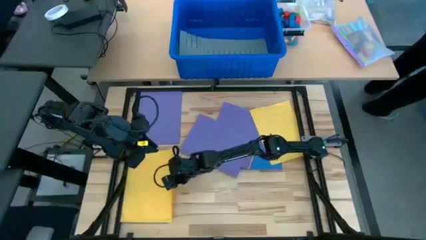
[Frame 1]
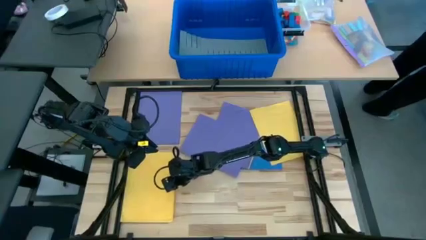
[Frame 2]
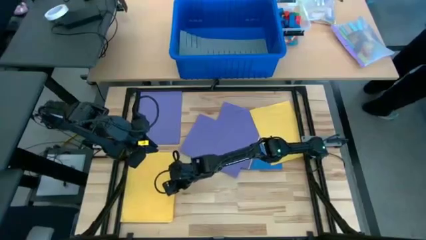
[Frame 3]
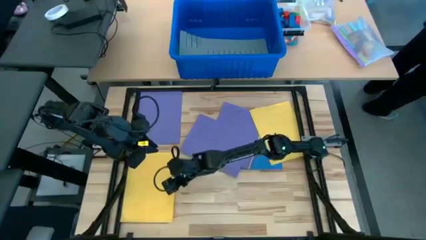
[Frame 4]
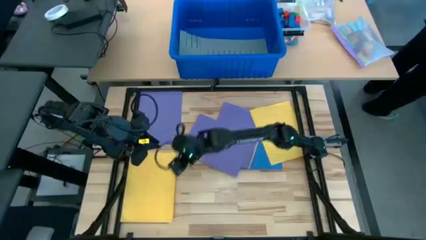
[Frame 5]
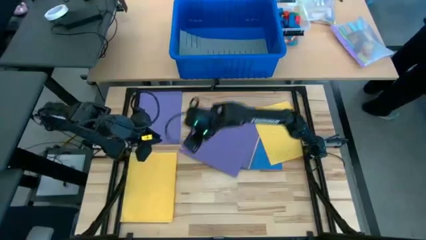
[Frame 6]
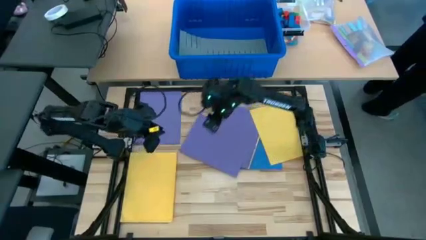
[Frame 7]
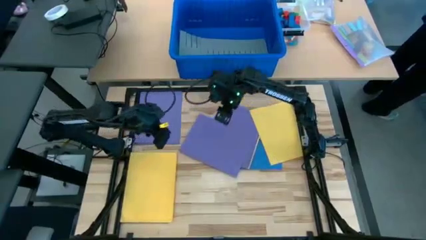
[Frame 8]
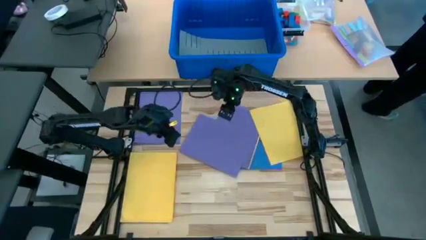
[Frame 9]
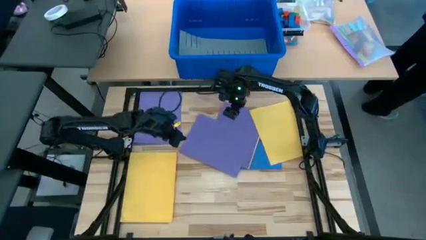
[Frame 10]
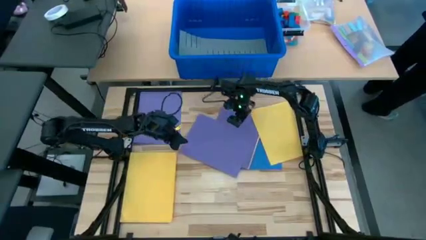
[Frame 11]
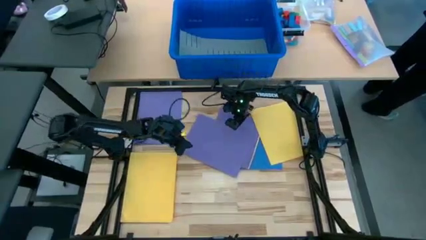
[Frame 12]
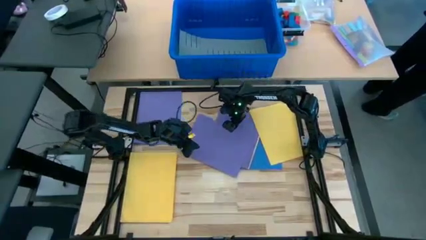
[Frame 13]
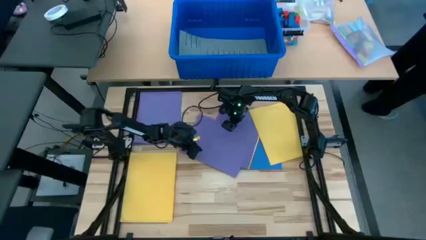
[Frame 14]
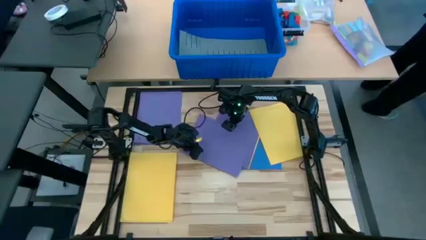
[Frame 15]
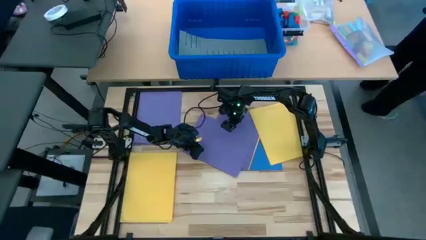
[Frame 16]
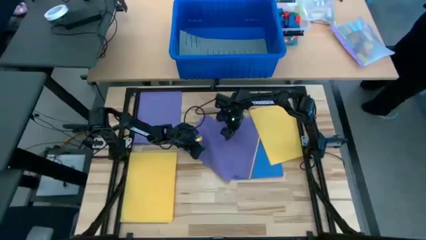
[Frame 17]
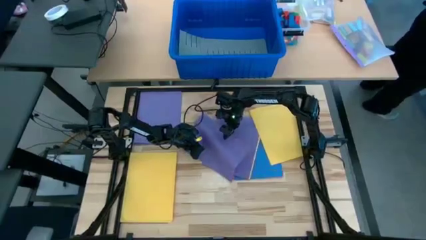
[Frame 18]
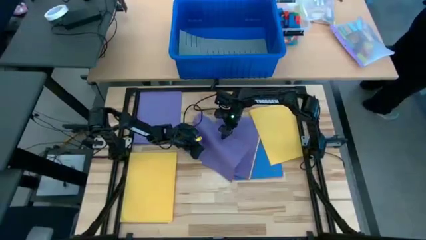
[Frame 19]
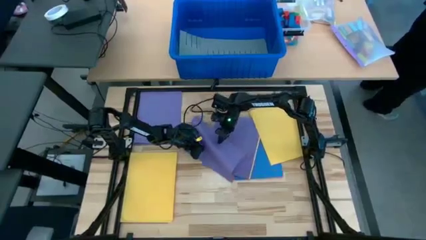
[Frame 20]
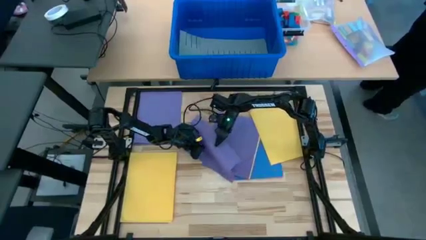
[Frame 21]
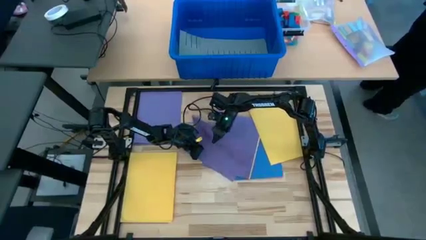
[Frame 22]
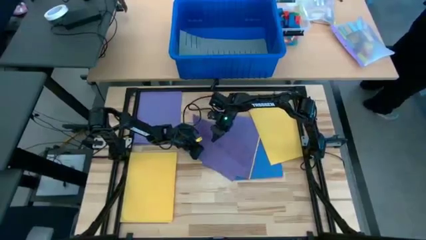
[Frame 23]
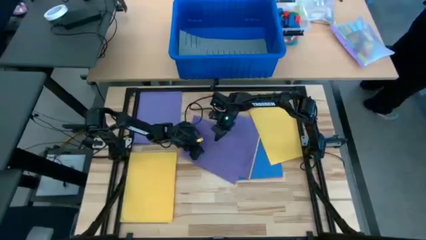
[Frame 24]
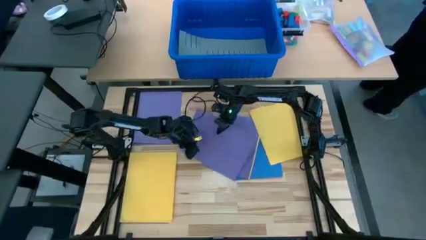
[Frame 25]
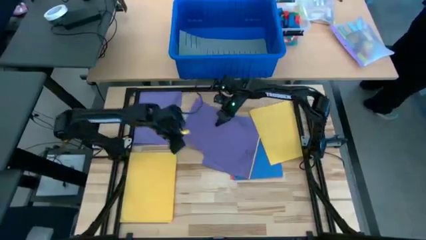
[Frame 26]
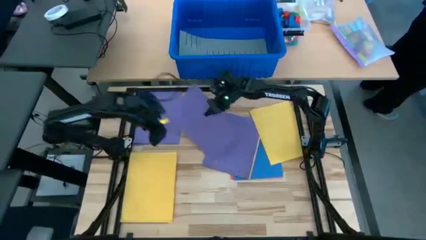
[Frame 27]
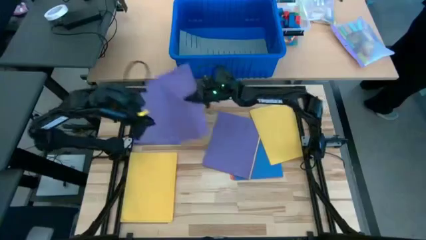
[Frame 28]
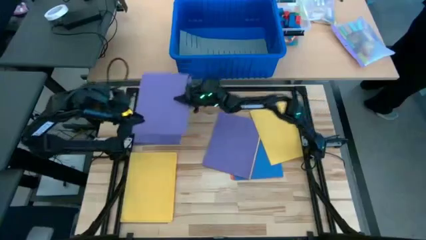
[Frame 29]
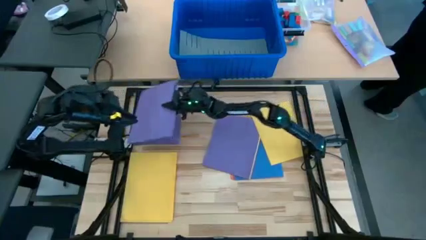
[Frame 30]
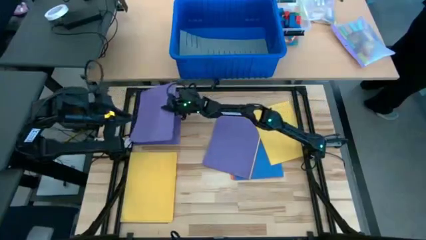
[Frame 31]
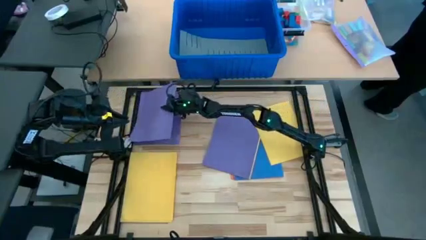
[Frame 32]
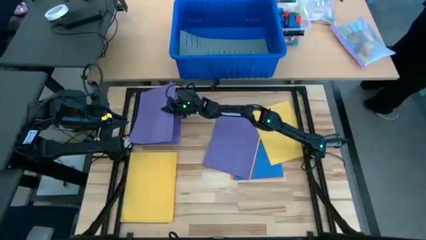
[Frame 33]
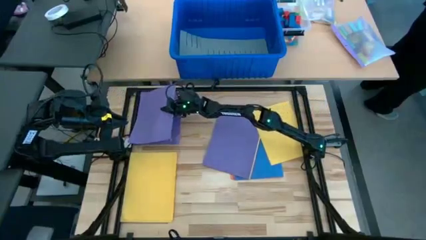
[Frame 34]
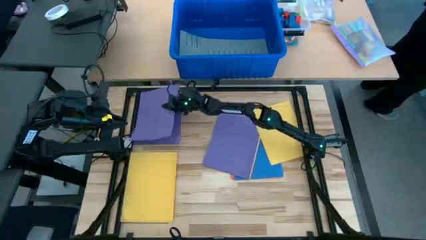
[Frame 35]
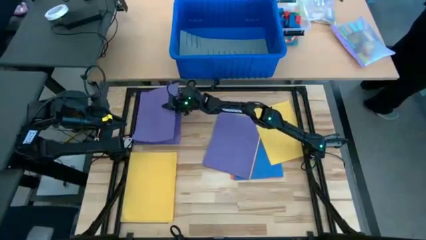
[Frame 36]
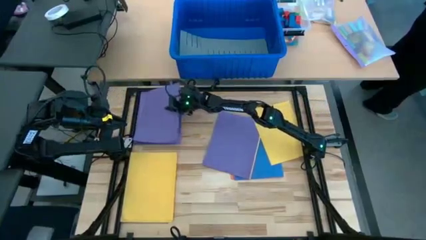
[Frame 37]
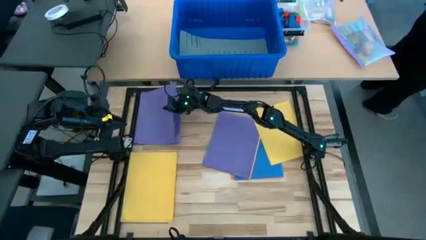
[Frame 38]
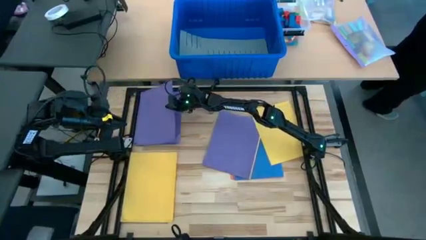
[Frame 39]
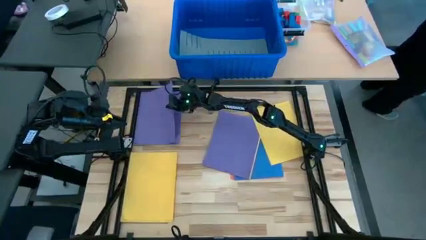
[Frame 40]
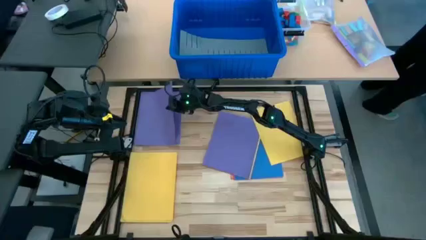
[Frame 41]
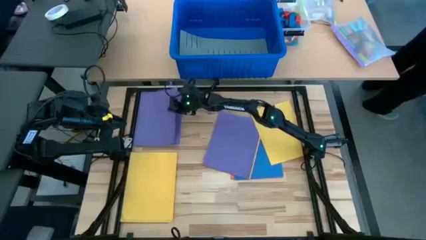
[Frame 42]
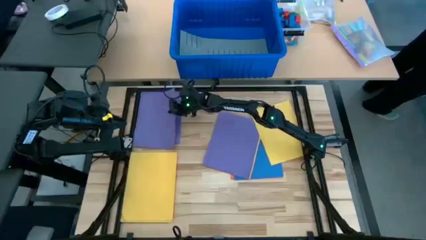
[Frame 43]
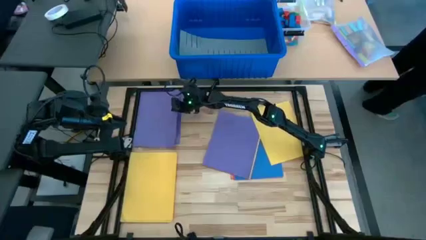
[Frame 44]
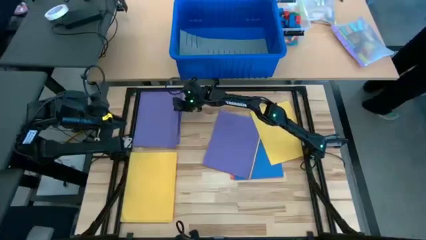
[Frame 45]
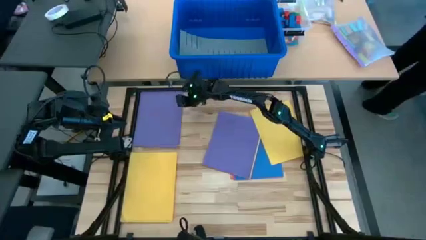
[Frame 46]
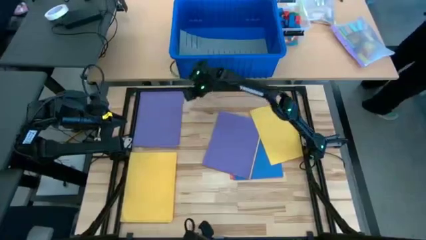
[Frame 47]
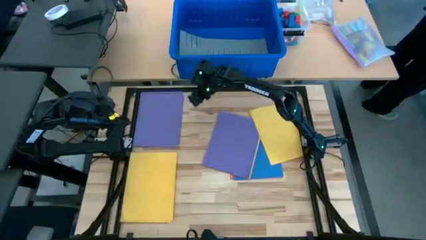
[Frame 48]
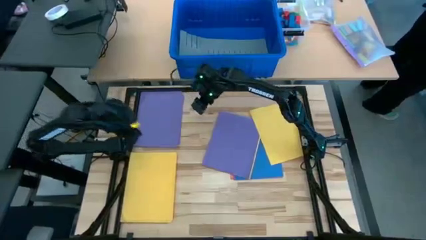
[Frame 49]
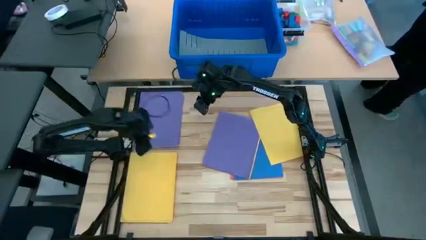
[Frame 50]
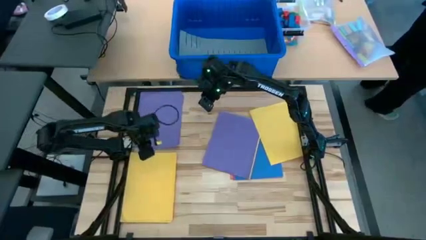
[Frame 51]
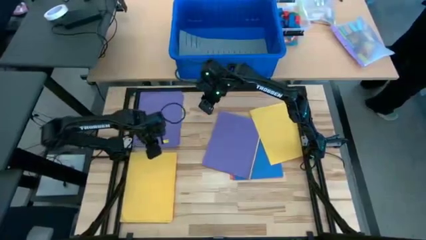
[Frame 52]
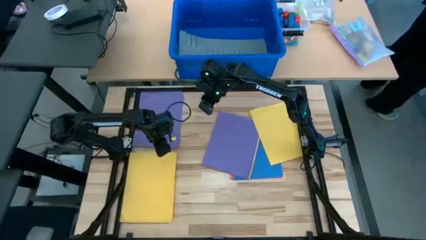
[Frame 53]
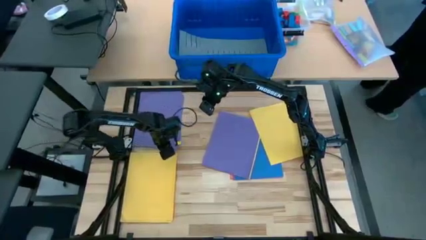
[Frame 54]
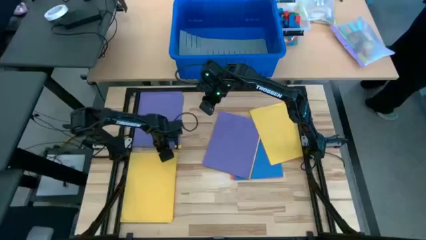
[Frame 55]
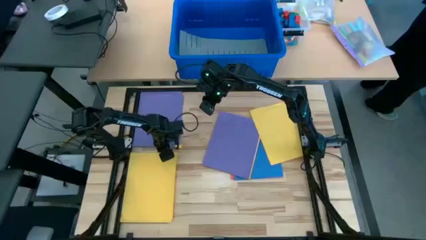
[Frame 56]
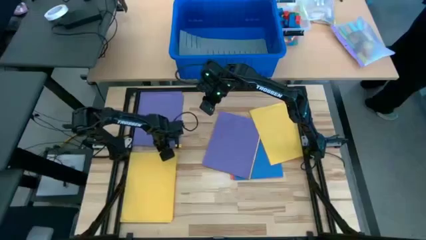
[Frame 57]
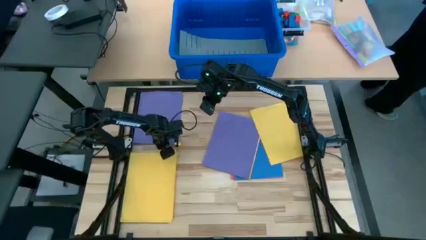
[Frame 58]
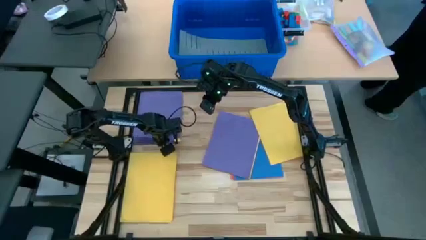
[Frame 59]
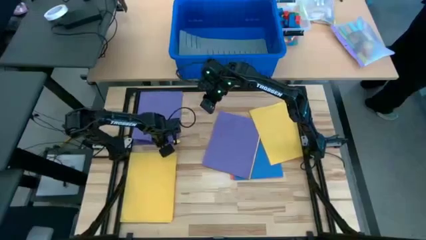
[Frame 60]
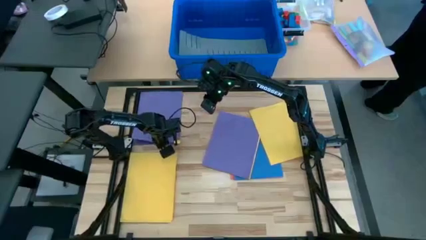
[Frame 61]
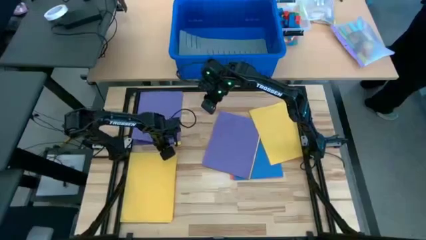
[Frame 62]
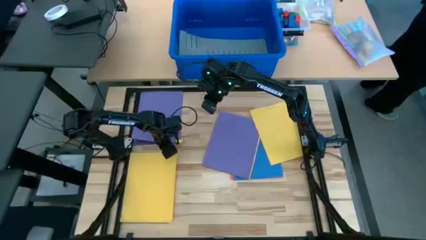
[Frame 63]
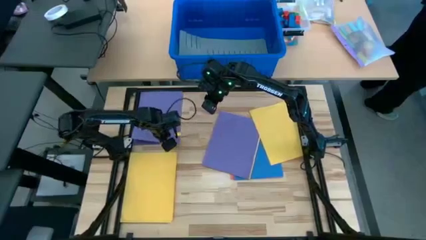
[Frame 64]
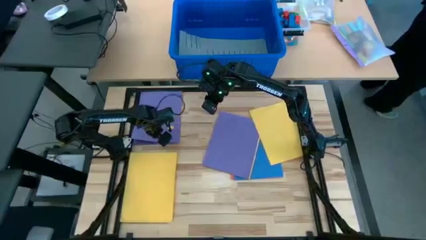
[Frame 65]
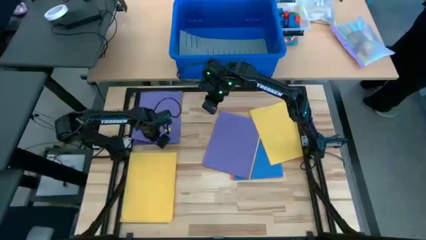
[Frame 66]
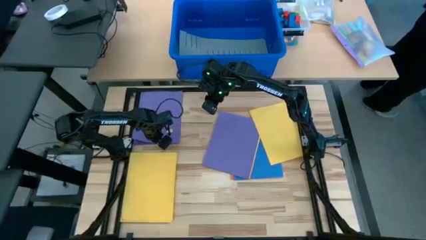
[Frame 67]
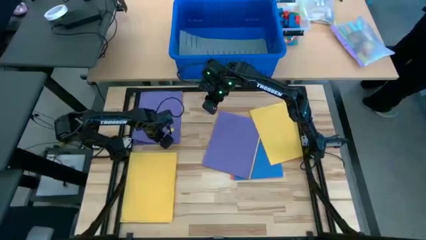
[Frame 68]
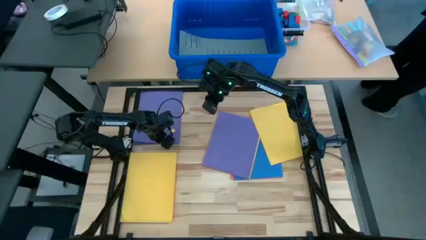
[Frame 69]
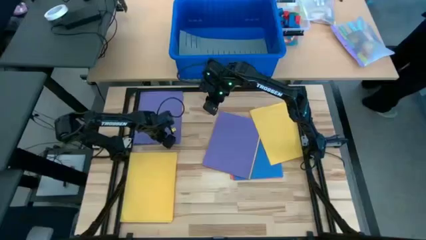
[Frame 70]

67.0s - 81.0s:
Task: Organize paper
Stack the purple colored paper on top of the other purple colored papers

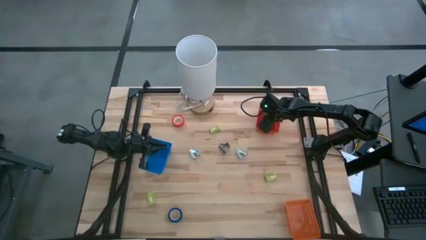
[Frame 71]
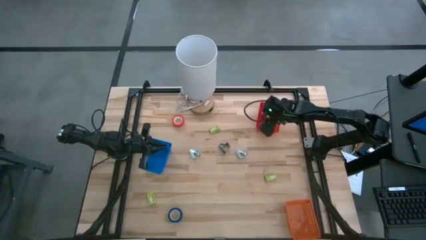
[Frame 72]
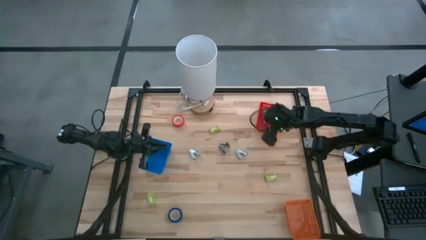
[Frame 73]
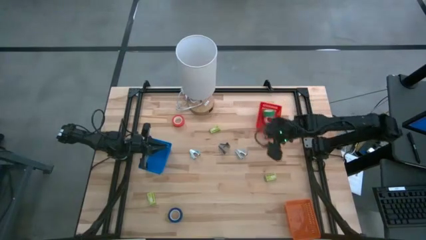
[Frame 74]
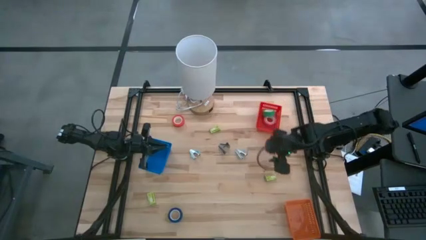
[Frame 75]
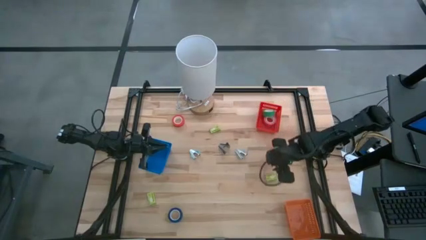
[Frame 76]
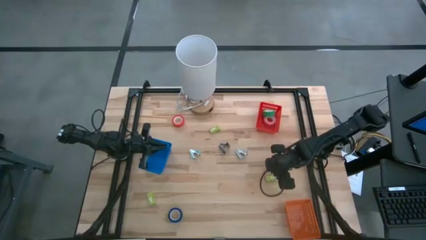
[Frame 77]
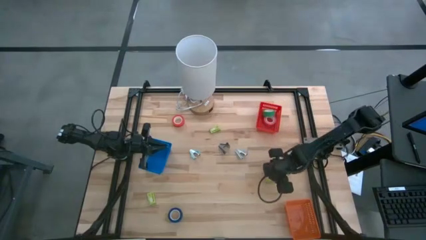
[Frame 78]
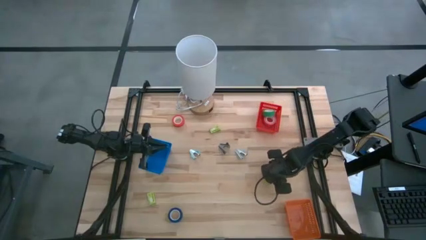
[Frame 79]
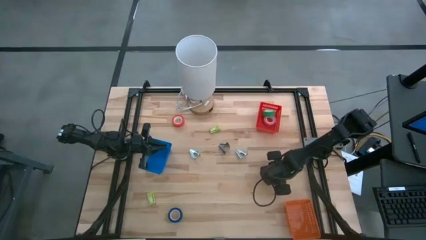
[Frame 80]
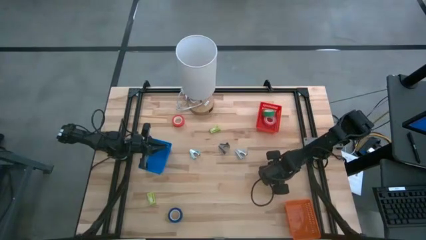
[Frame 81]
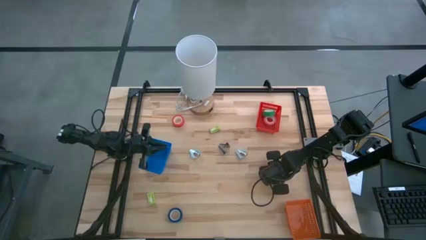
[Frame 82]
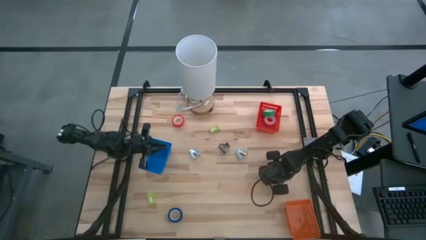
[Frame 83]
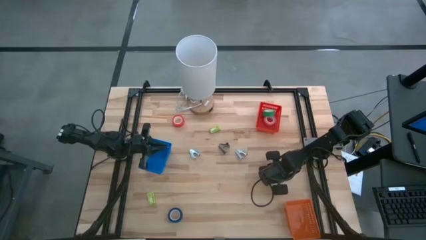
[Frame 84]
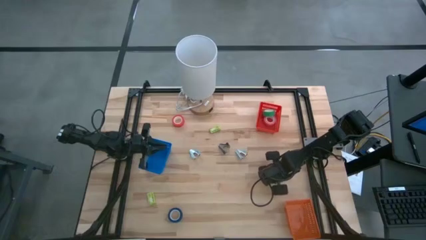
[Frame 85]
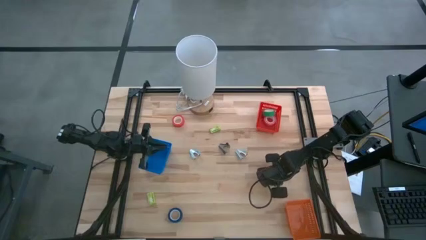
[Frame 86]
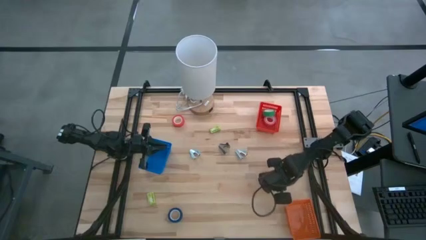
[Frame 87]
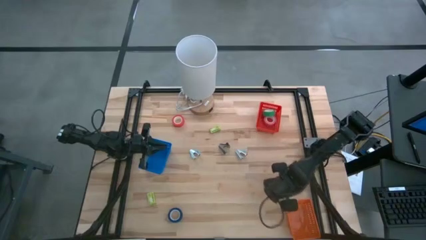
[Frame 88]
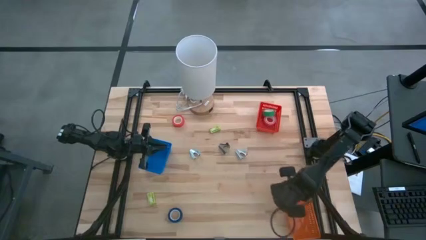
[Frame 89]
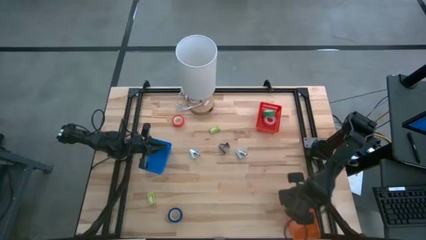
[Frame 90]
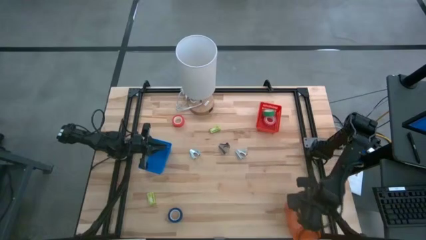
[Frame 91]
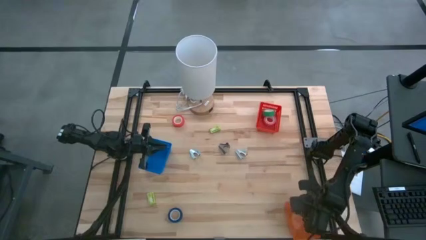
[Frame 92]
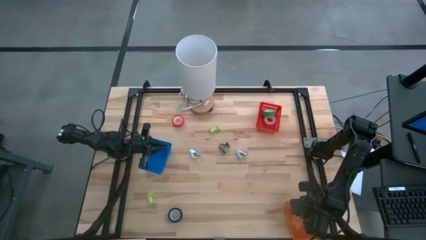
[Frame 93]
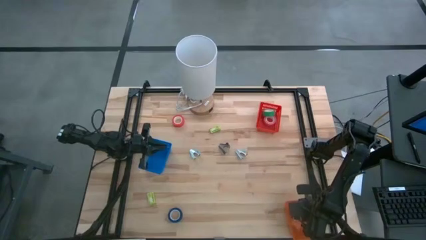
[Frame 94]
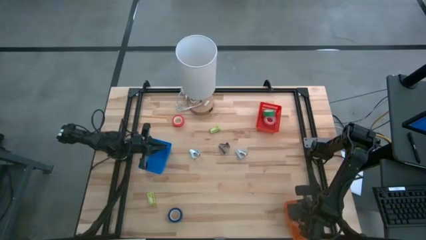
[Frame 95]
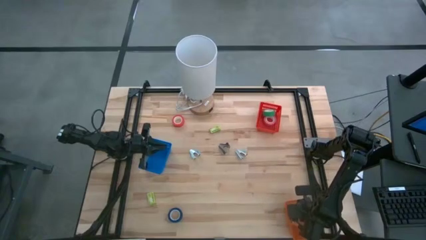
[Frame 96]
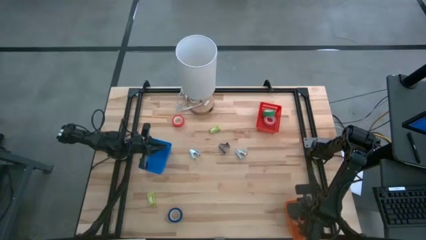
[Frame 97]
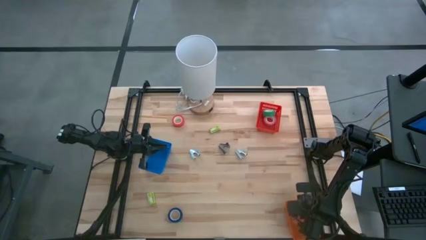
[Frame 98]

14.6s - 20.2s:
Task: Pick and place Stapler, Stapler remover, tape
Put the middle staples box into the orange bin
